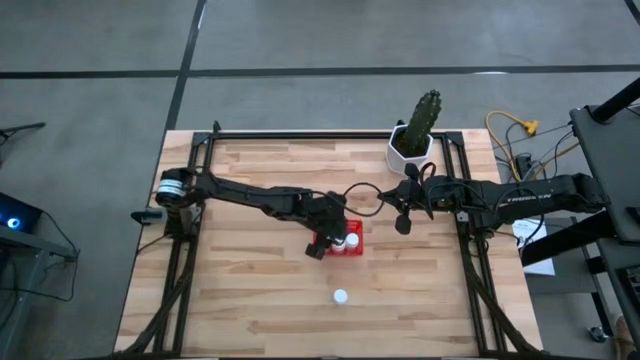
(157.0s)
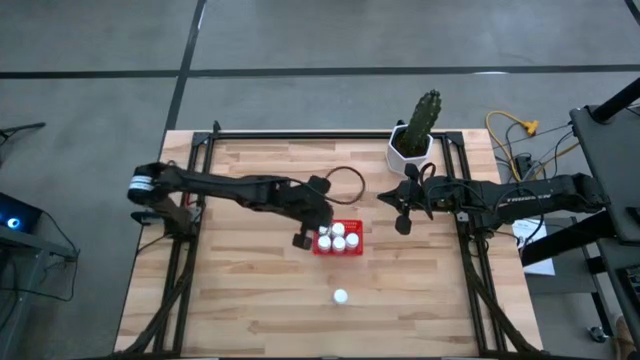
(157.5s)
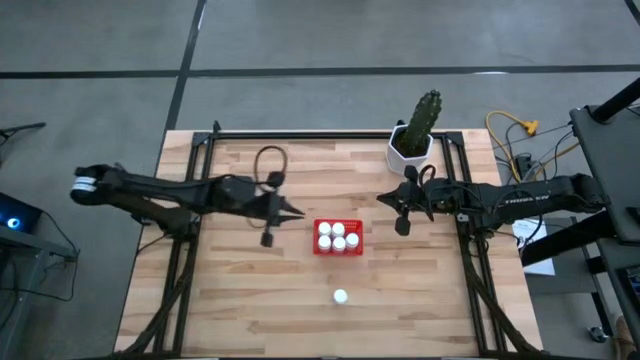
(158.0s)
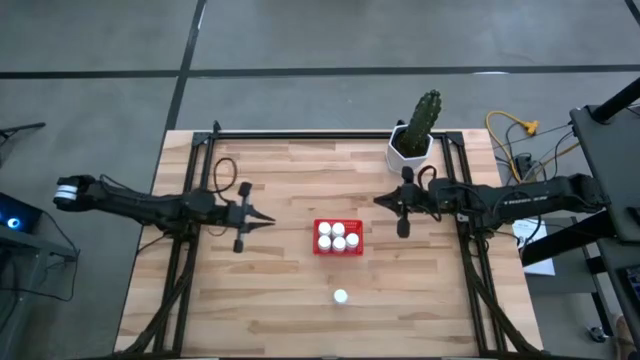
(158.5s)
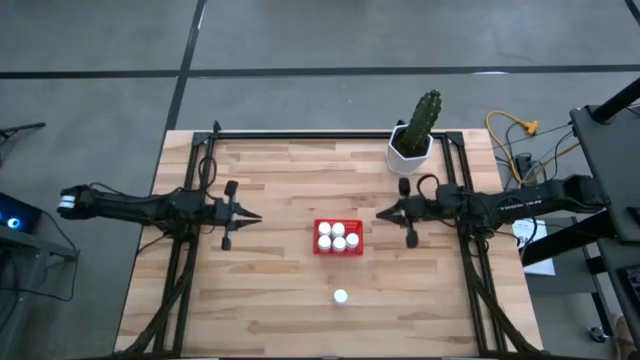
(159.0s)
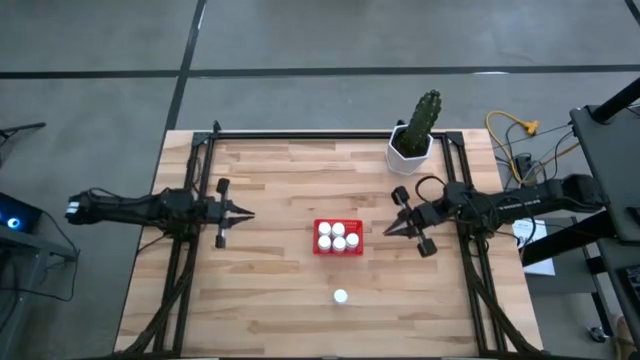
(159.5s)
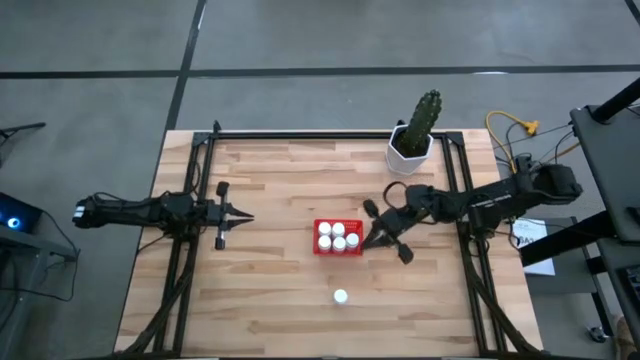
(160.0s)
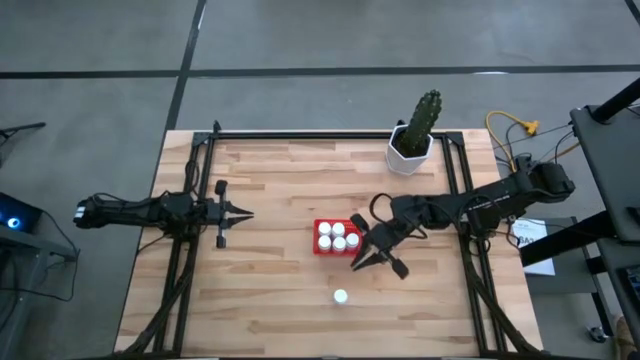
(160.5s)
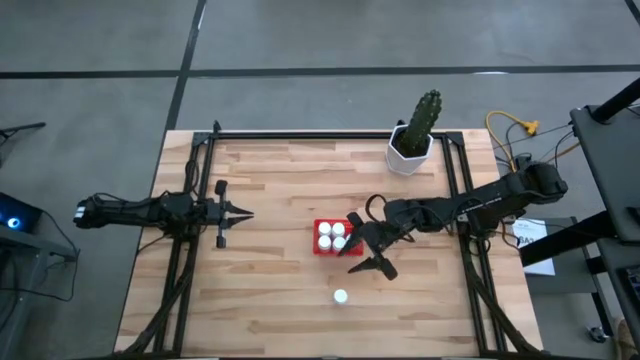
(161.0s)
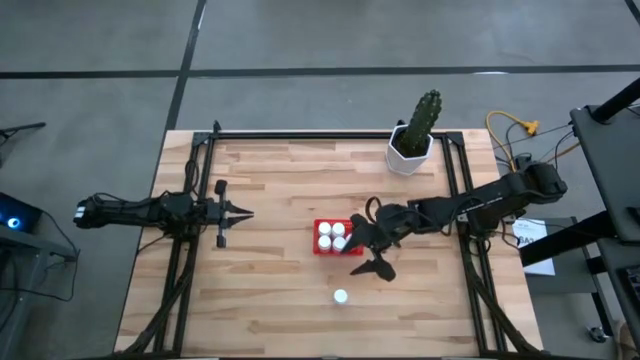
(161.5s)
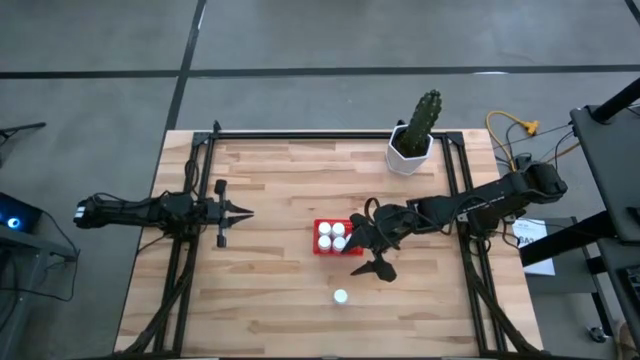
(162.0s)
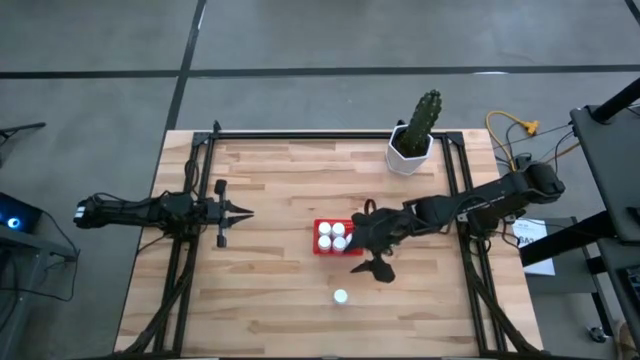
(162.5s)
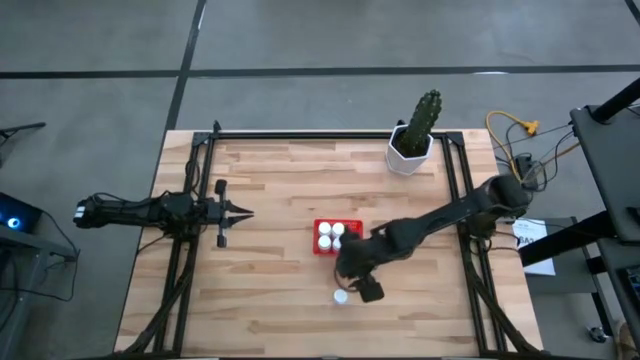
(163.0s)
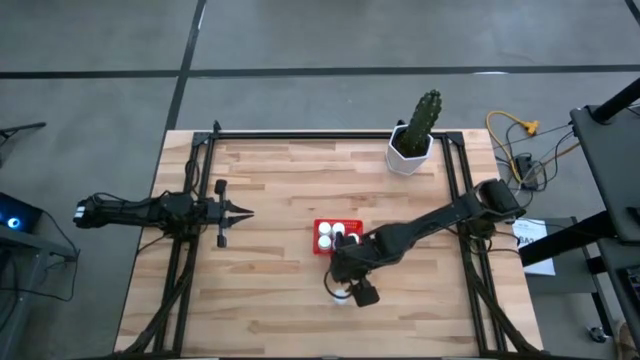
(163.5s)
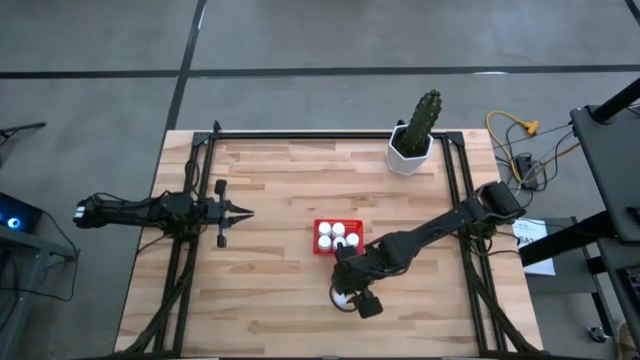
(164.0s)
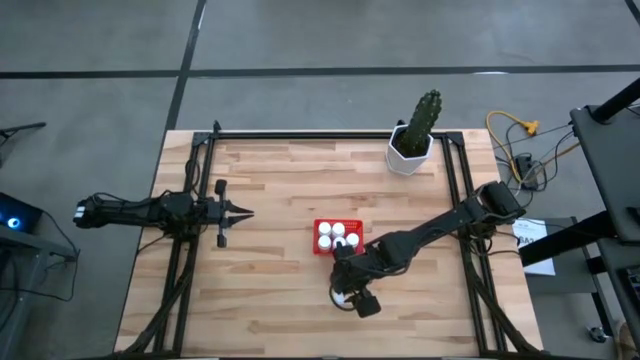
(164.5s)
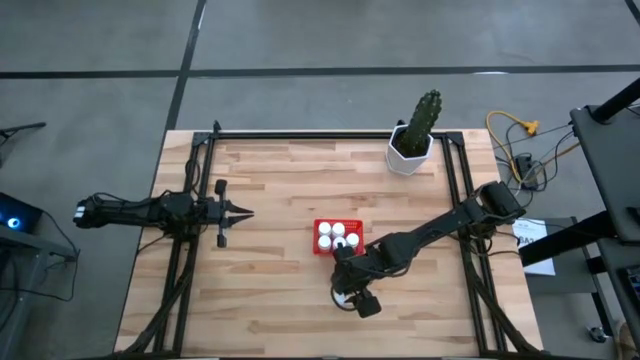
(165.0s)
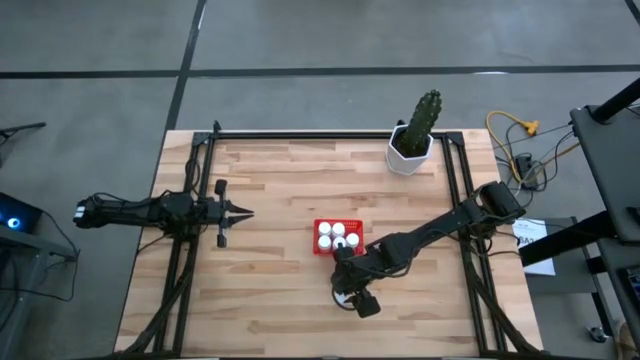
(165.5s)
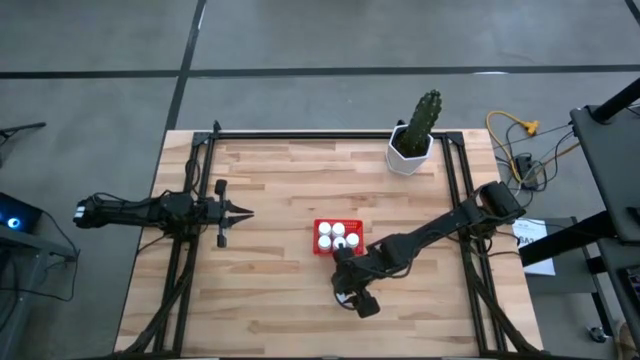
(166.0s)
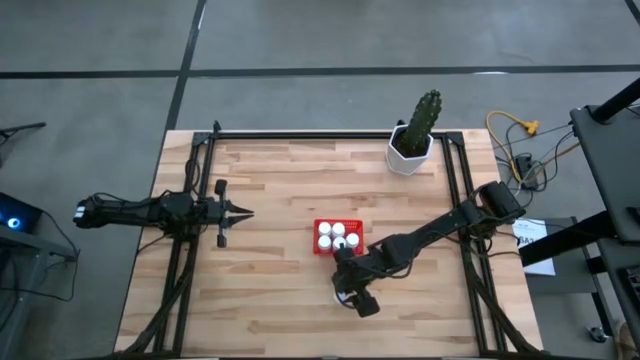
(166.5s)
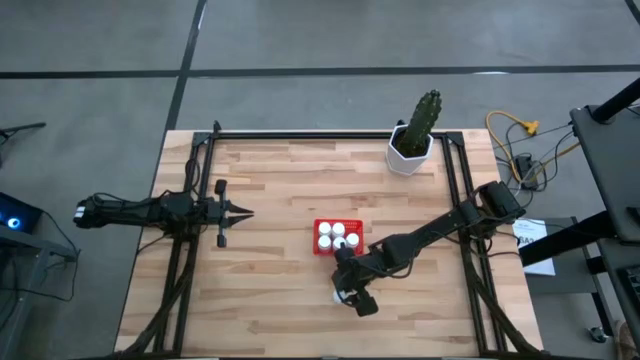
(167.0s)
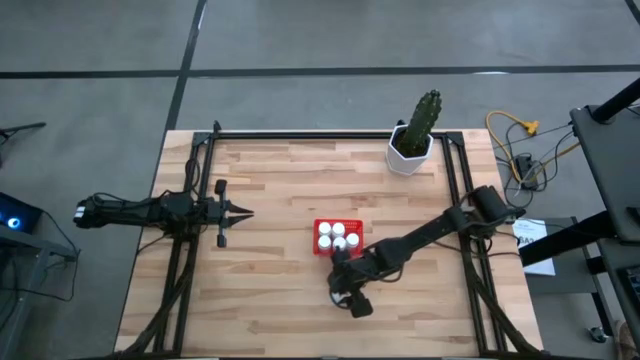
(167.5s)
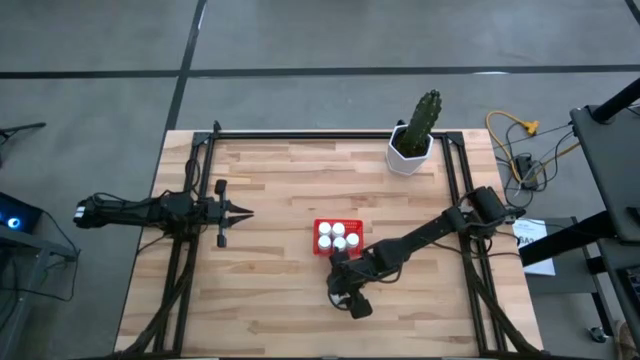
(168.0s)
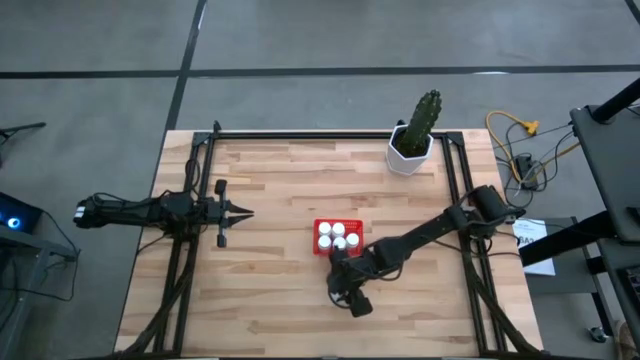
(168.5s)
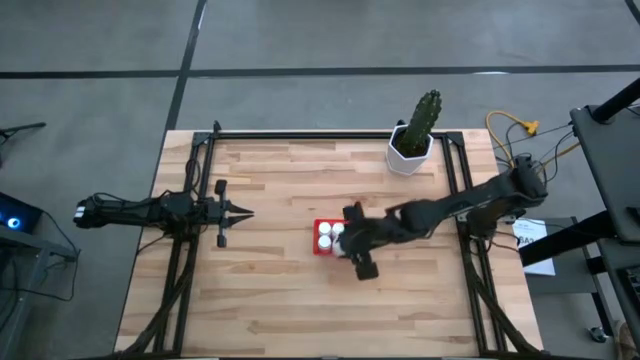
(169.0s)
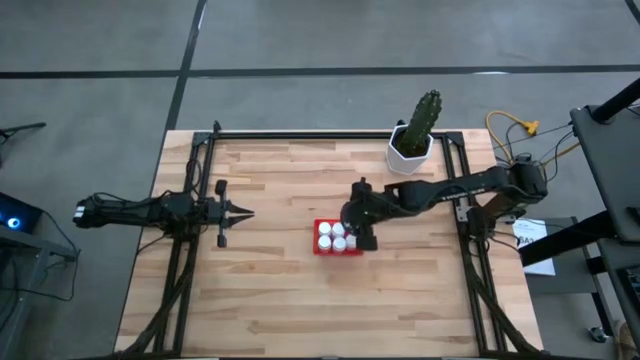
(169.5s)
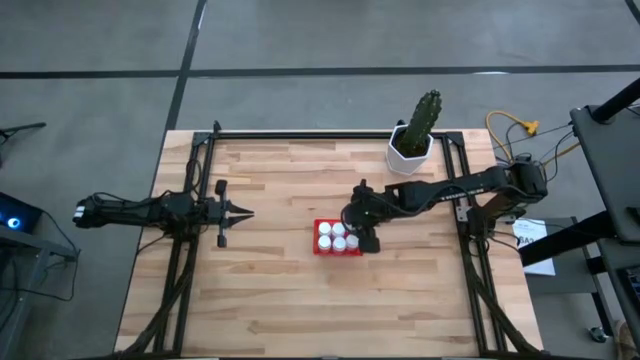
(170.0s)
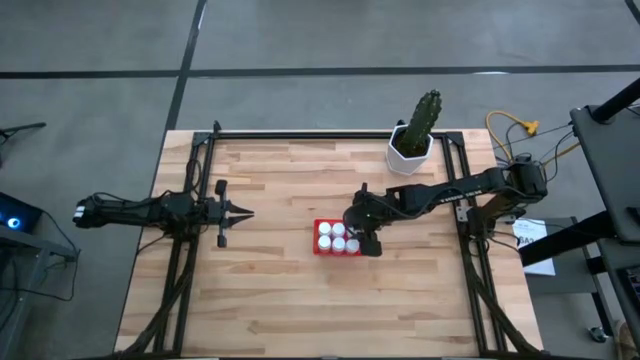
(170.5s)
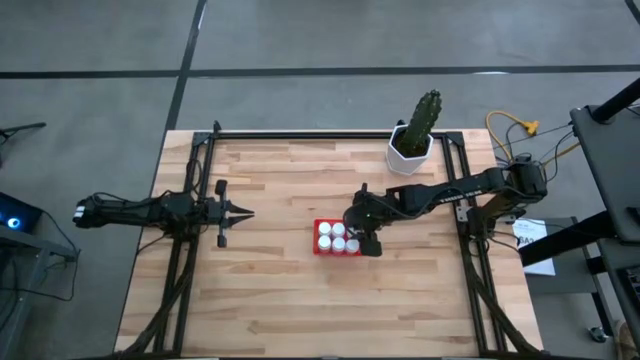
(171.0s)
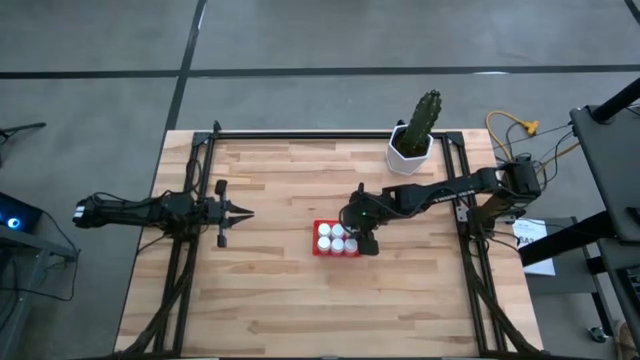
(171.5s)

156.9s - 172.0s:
Task: Pick and place pill bottles into a basket
Put the white pill bottle into the red basket

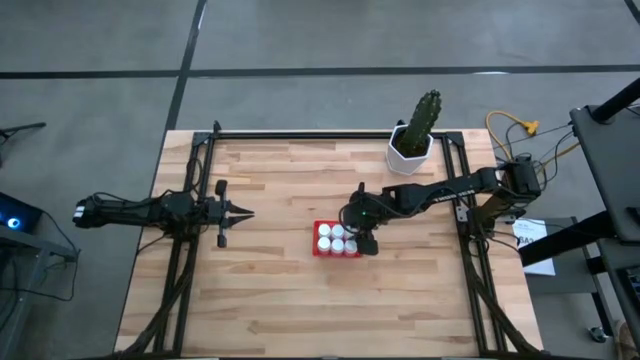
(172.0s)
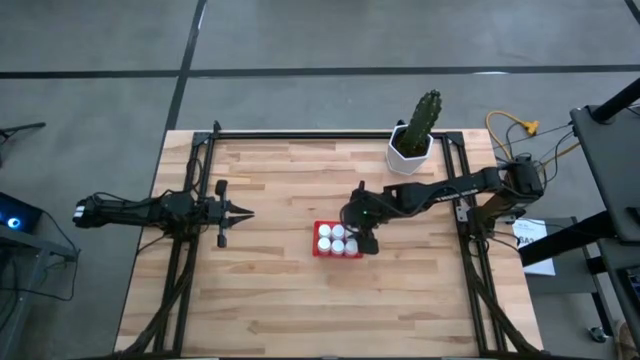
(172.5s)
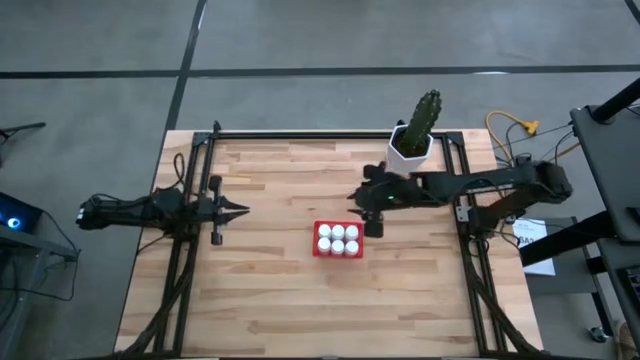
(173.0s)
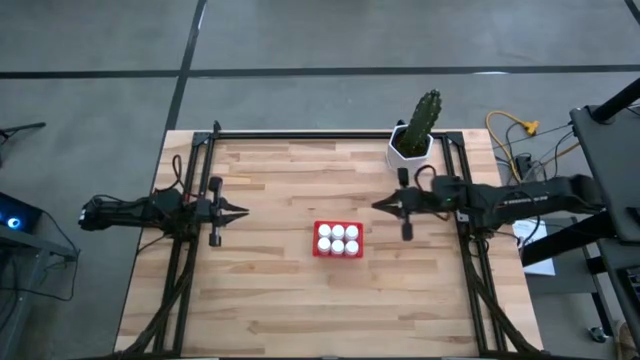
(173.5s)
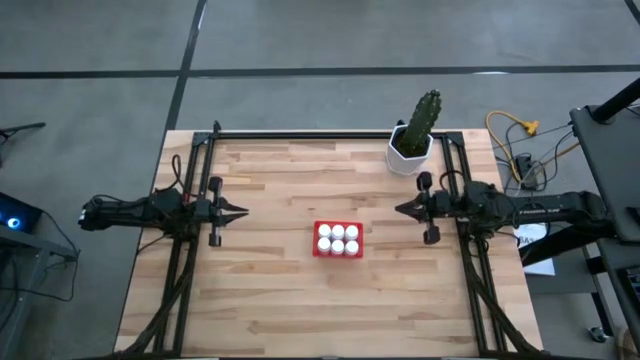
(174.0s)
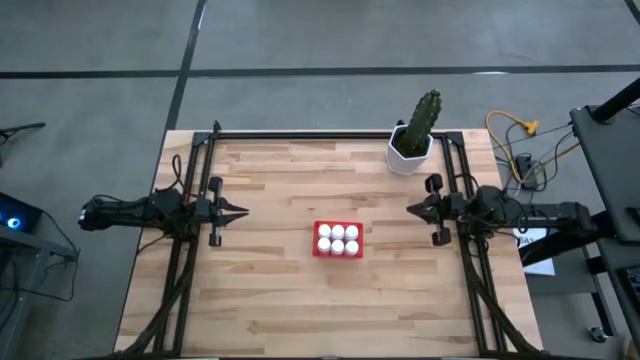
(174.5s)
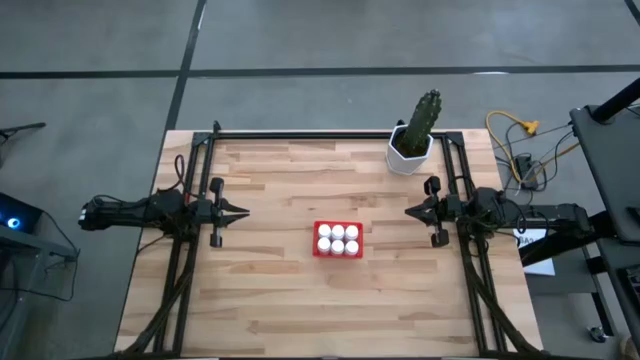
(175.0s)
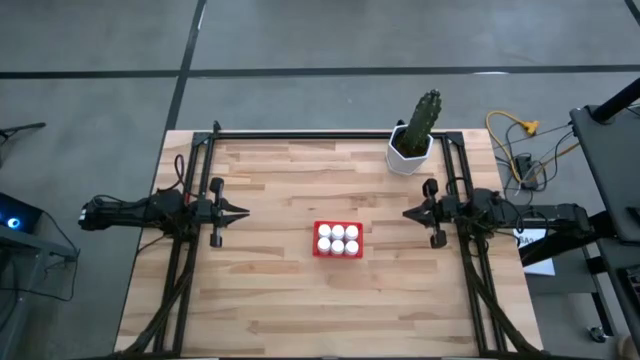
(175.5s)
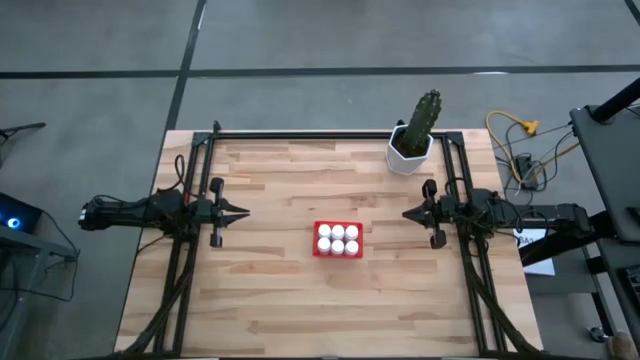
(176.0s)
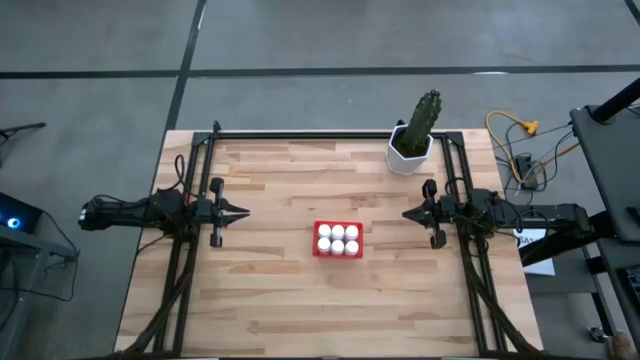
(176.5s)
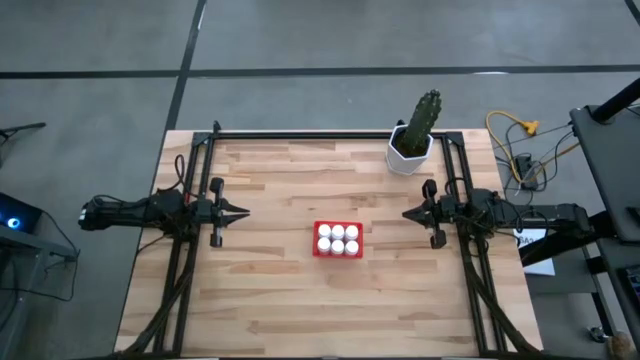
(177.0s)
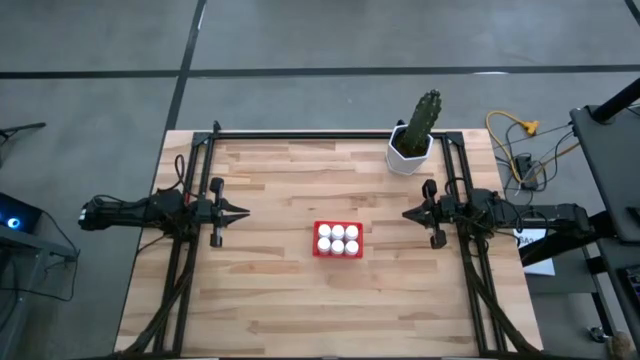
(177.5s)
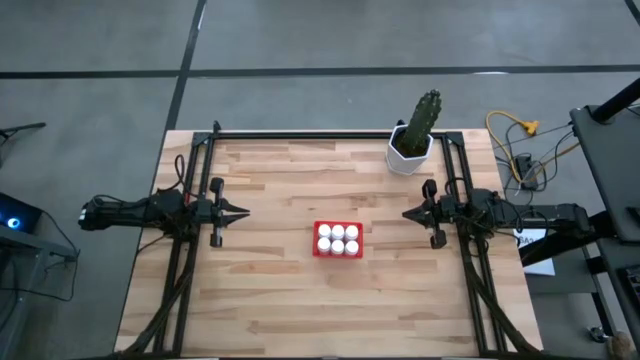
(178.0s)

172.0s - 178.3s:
Return to Home Position
